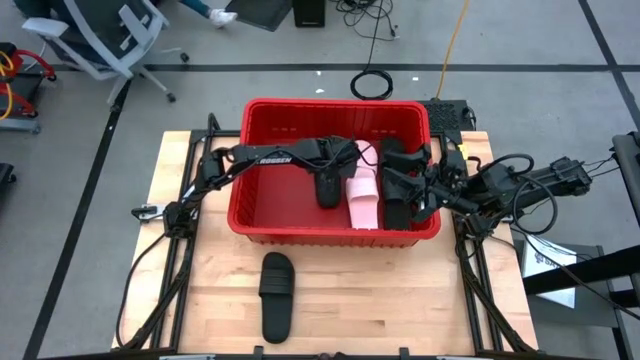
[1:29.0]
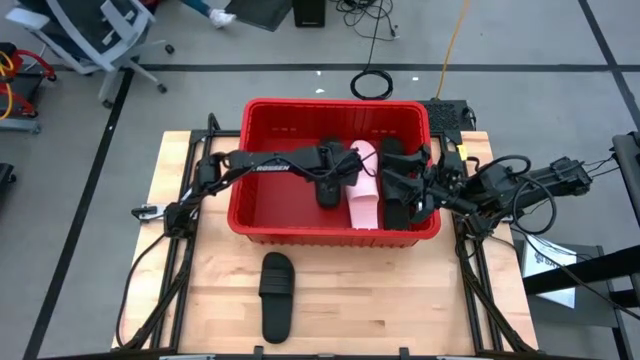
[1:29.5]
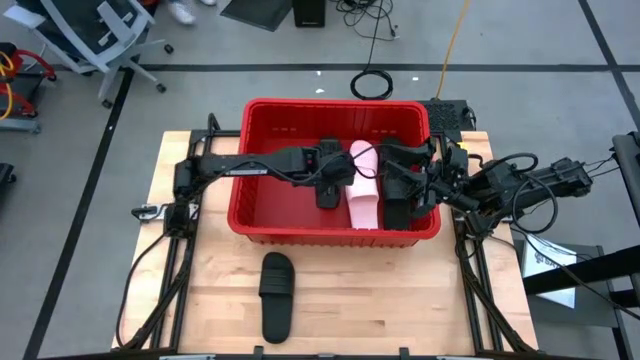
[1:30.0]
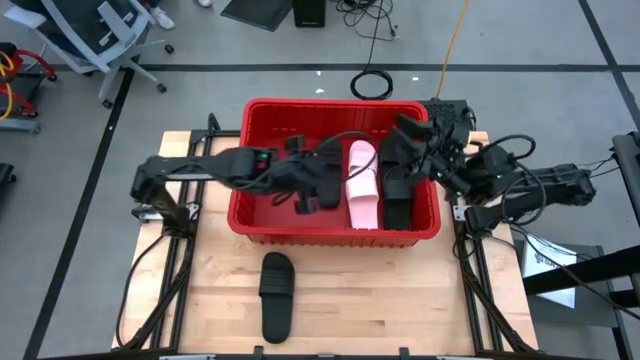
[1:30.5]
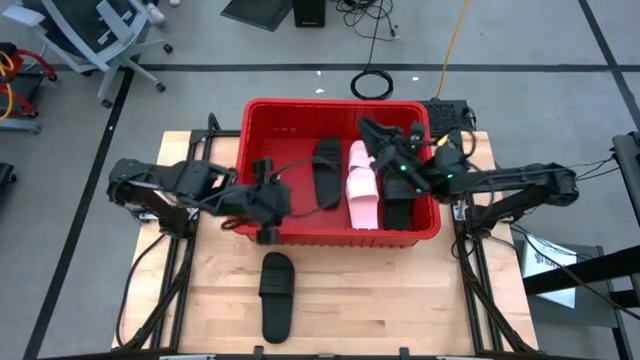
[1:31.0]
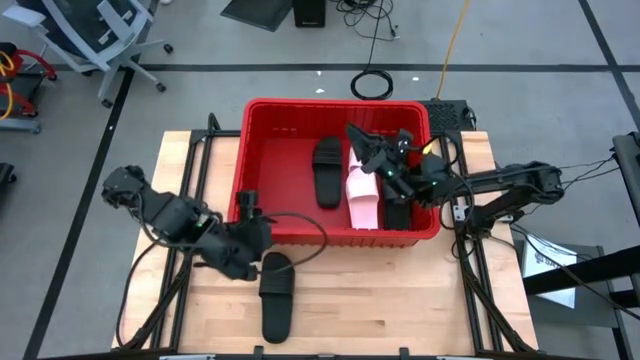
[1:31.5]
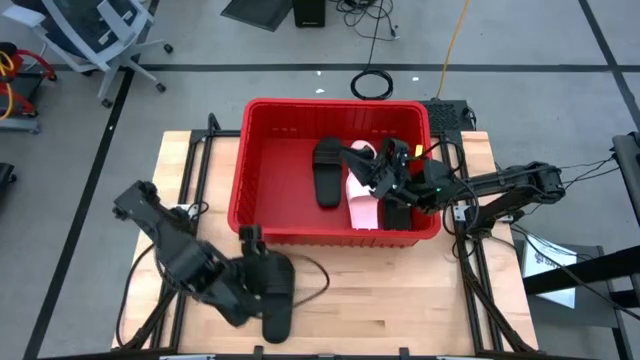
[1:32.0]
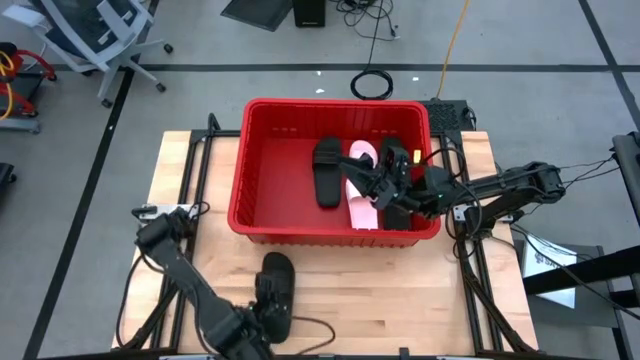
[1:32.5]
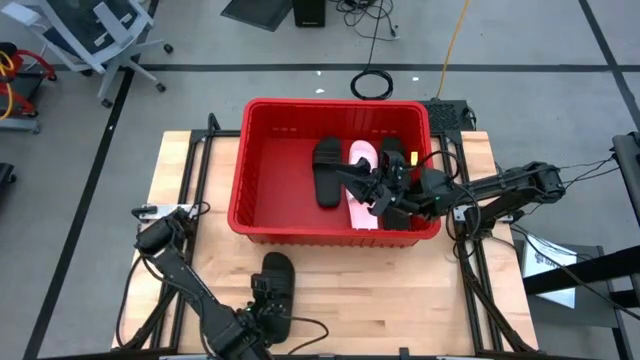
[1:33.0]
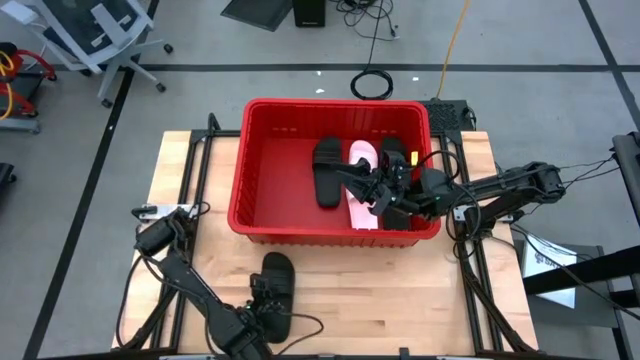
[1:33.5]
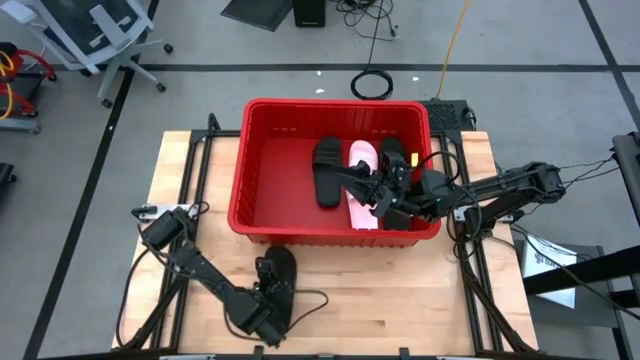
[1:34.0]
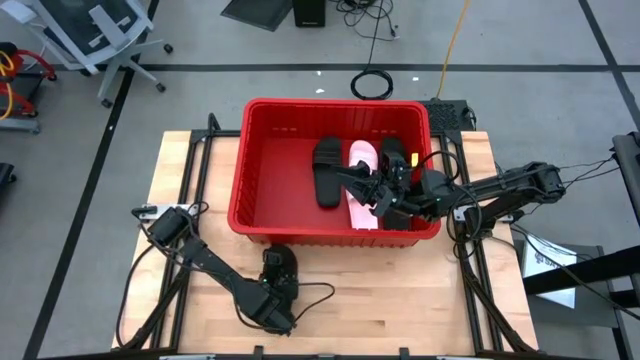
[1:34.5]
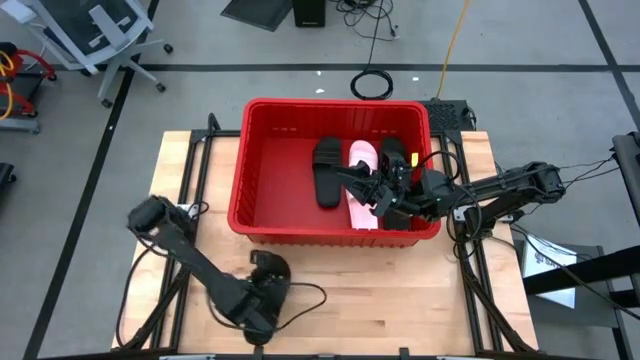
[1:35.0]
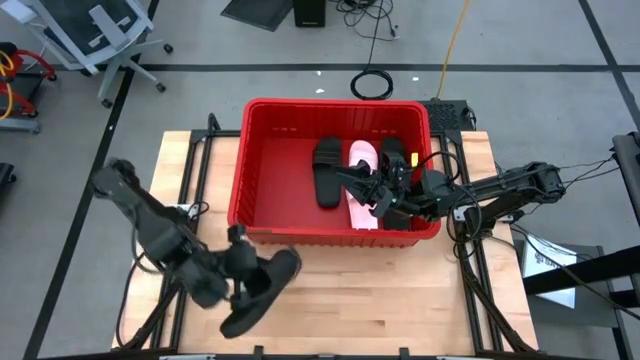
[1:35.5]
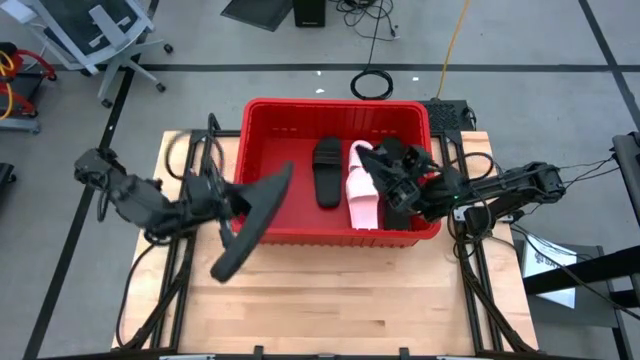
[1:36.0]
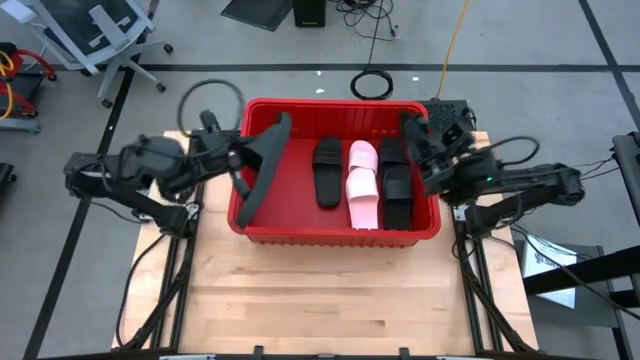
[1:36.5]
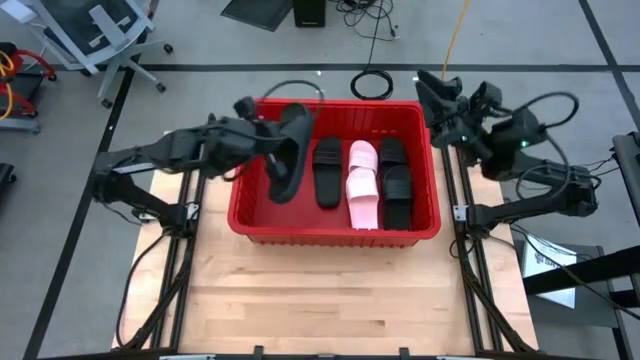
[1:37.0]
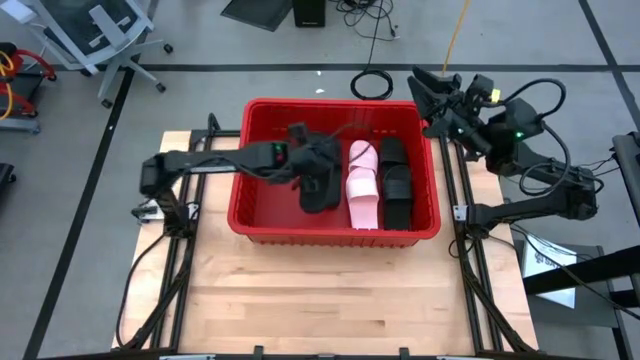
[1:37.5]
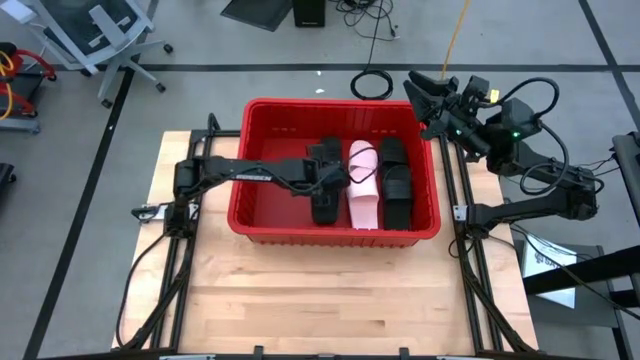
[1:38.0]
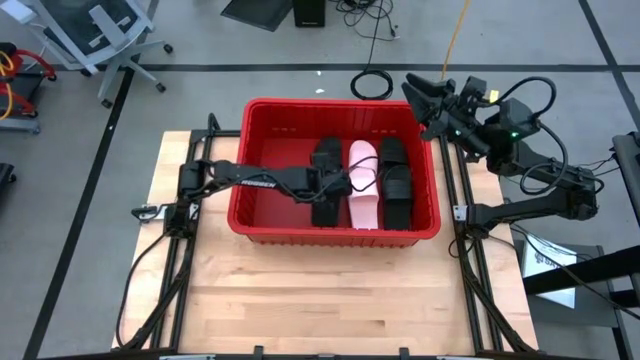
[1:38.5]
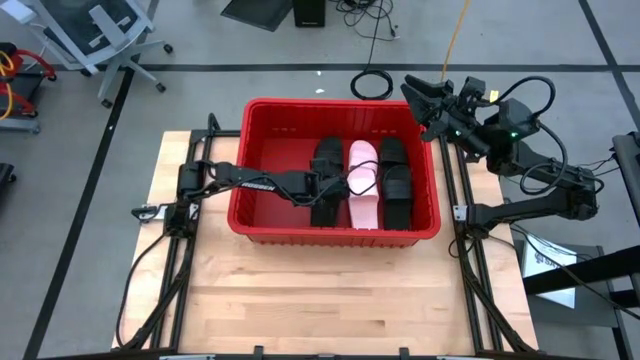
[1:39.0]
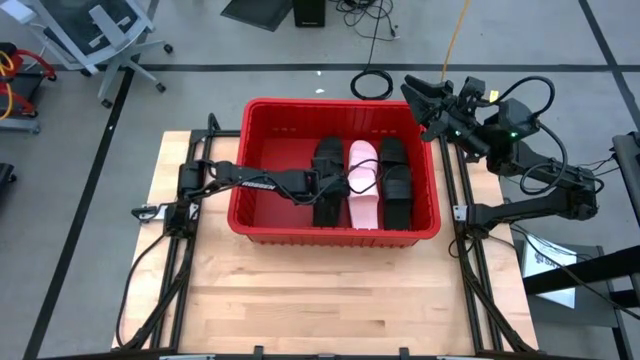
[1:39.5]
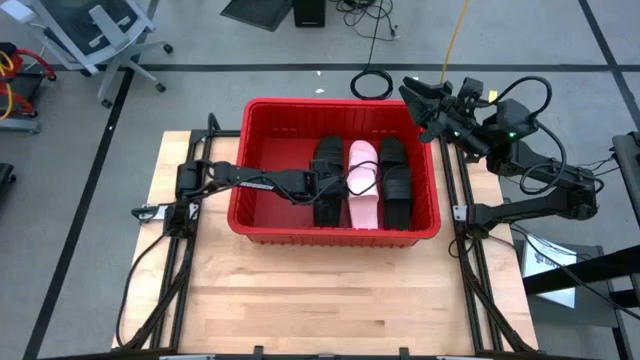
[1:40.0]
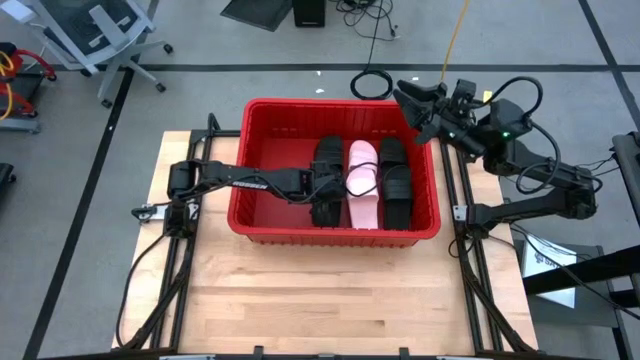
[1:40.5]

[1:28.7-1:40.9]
Task: Pick and place slides into bin
Put the black slide into the red bin

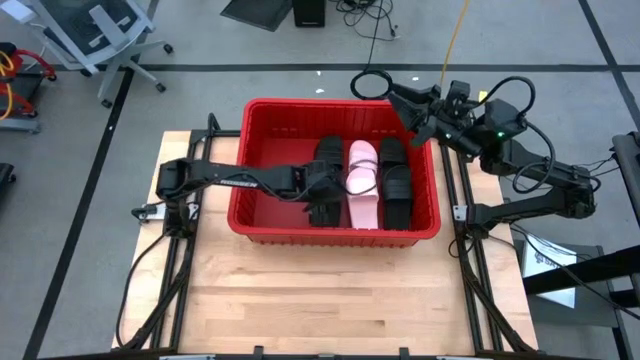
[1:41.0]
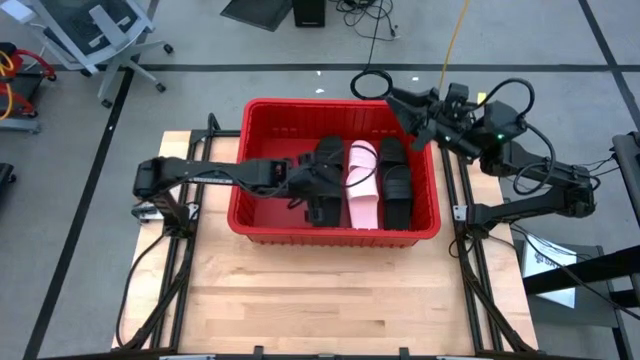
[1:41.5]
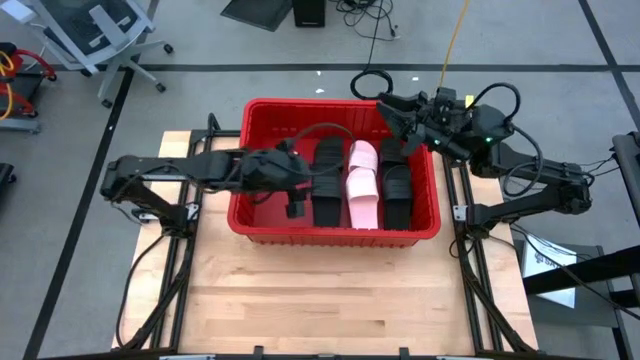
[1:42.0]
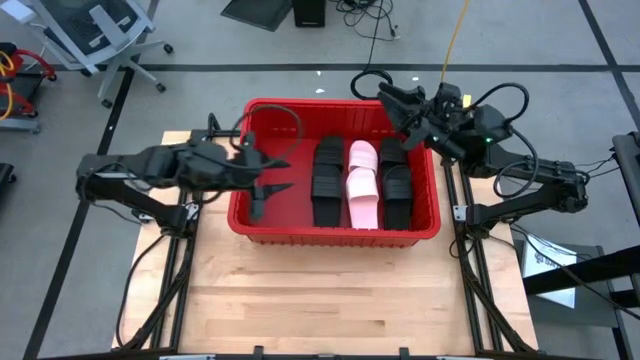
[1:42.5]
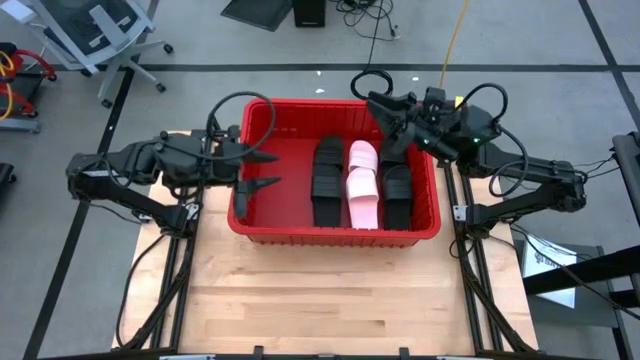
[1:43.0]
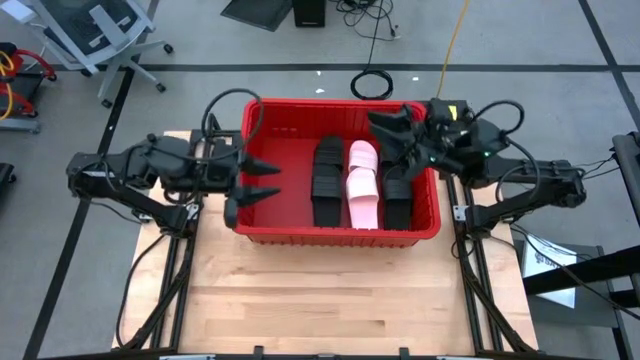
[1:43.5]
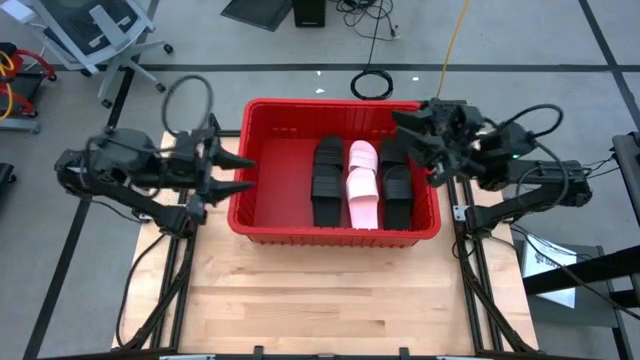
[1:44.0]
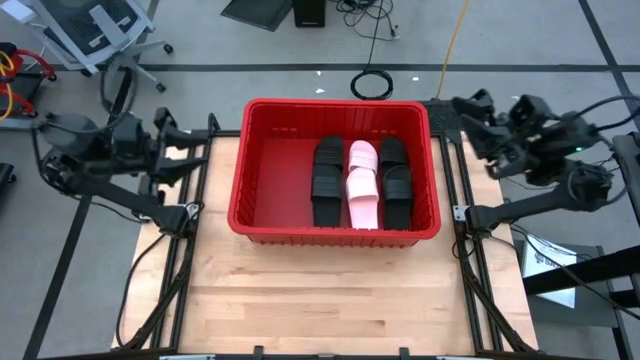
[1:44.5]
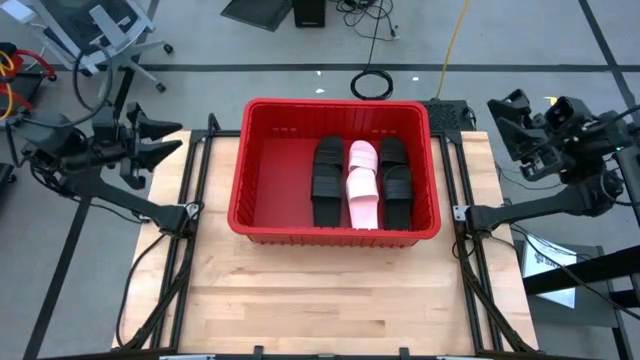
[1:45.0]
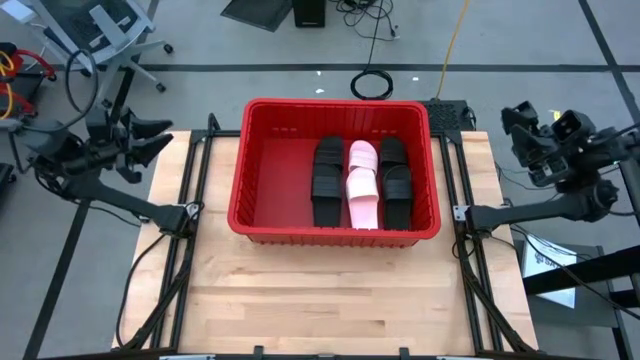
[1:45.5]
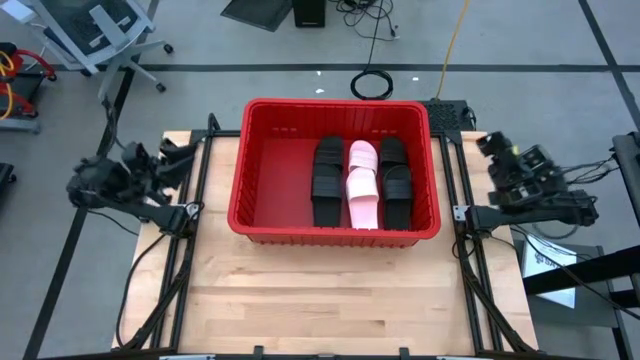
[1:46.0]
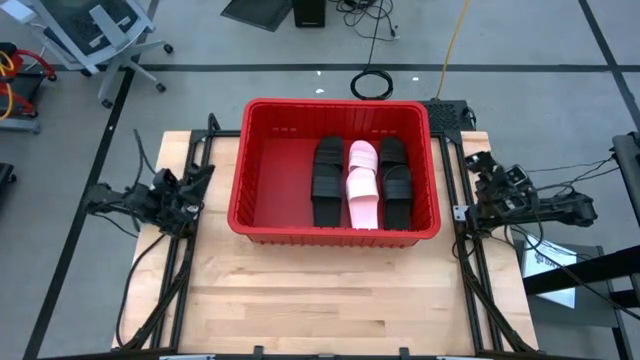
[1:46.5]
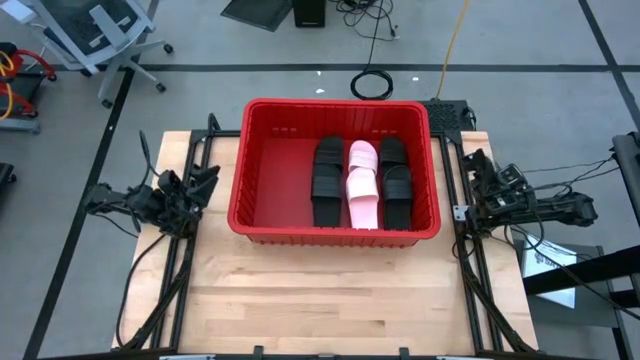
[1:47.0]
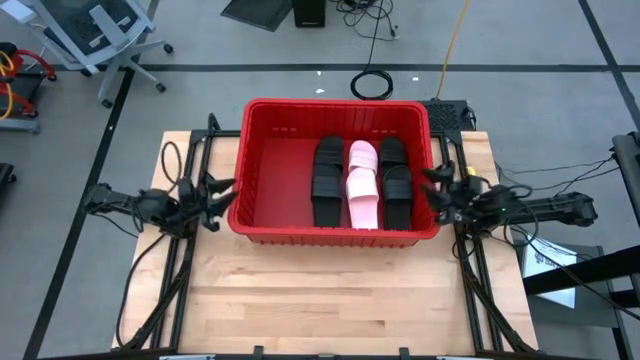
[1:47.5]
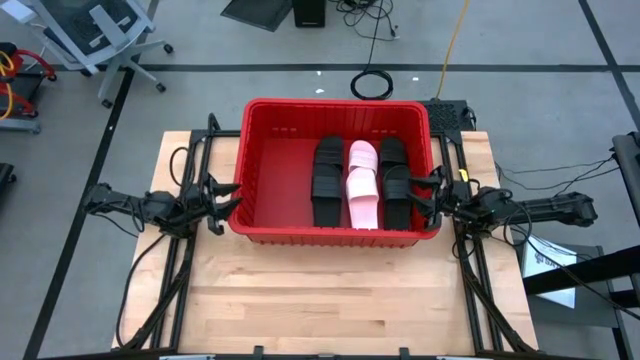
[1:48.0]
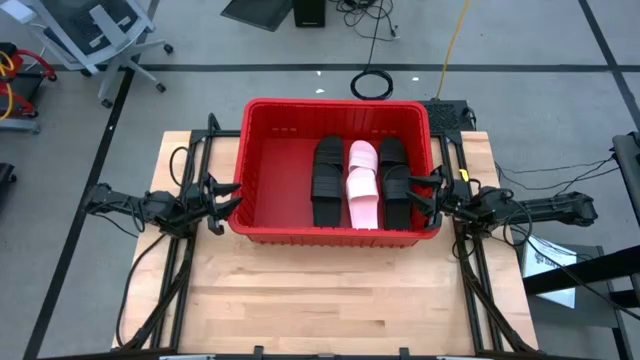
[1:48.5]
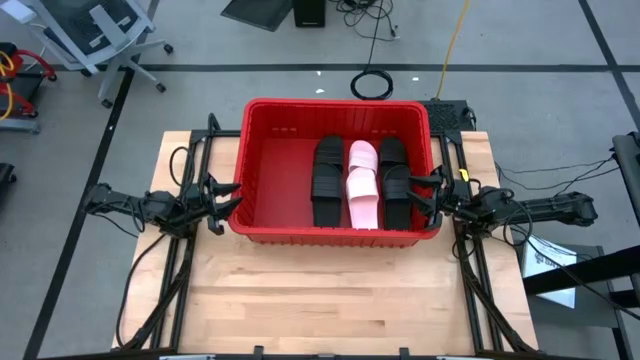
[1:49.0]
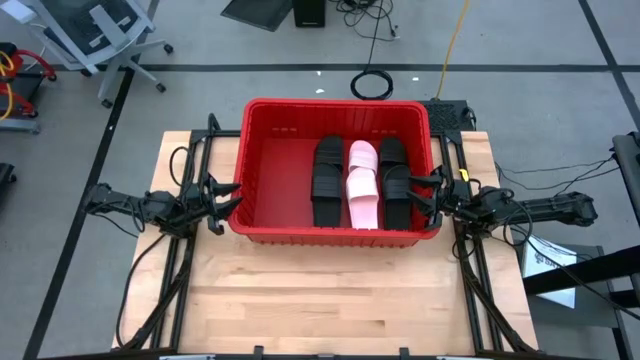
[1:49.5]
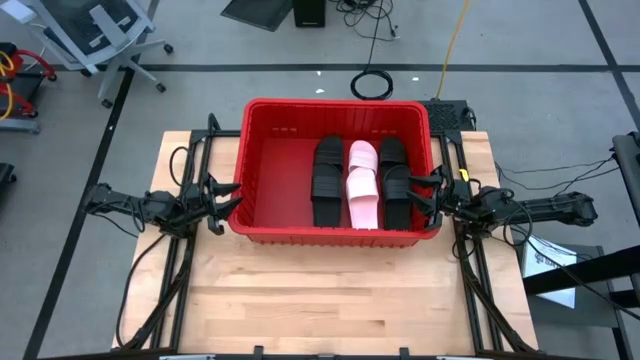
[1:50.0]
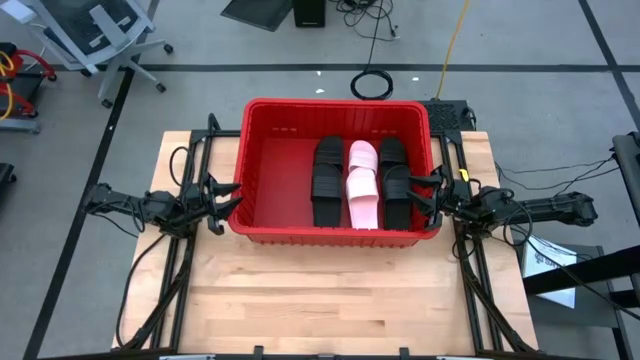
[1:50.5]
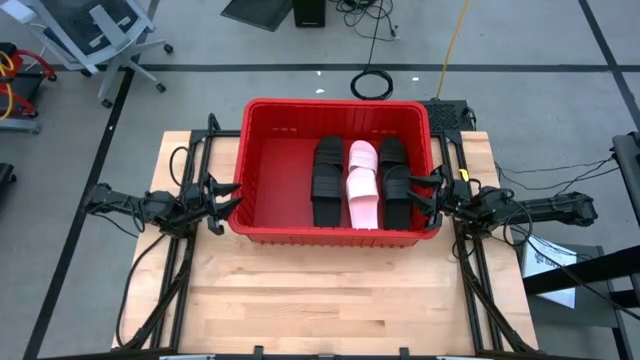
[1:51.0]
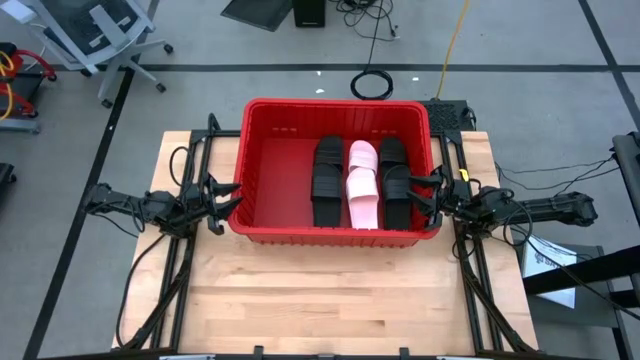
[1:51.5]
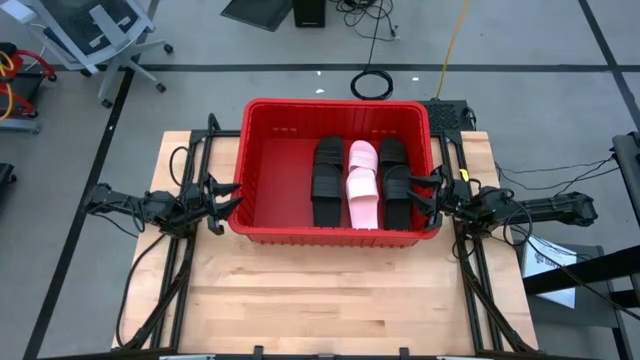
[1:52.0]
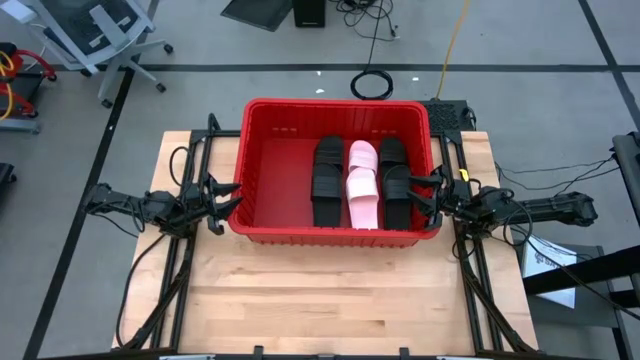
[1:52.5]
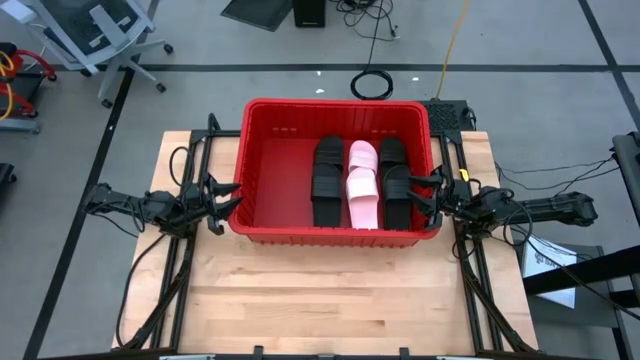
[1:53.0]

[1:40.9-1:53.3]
Return to Home Position
